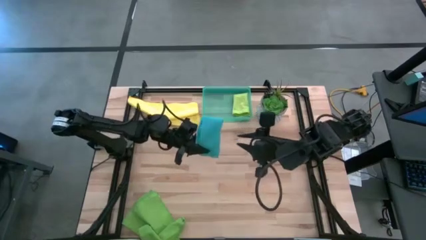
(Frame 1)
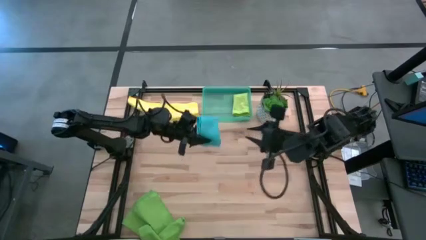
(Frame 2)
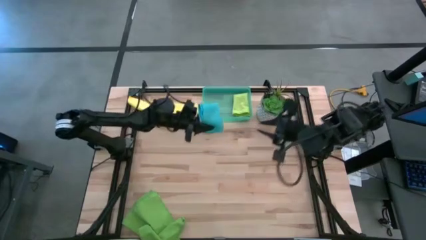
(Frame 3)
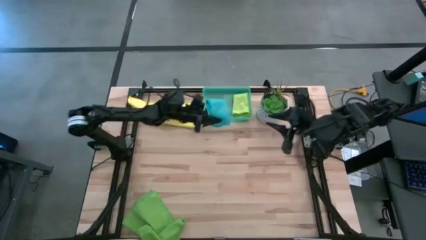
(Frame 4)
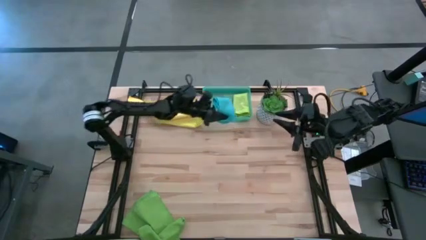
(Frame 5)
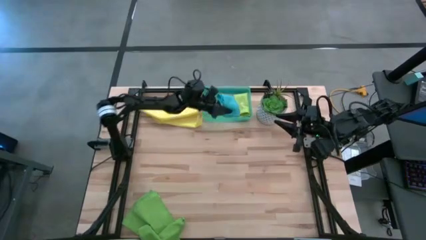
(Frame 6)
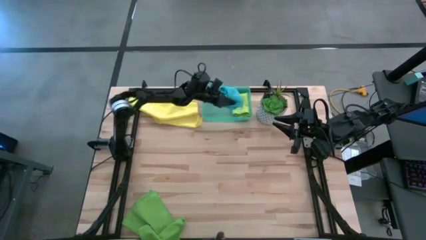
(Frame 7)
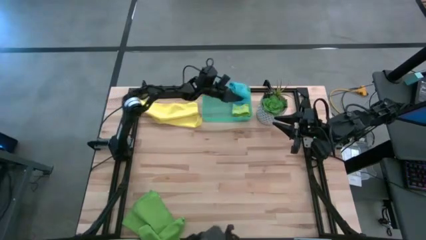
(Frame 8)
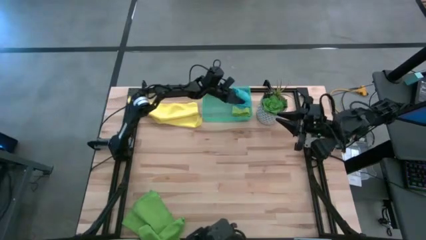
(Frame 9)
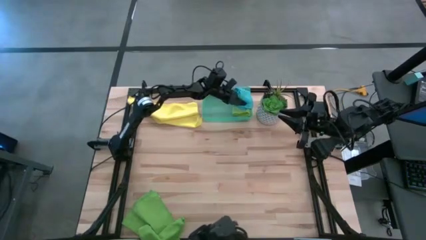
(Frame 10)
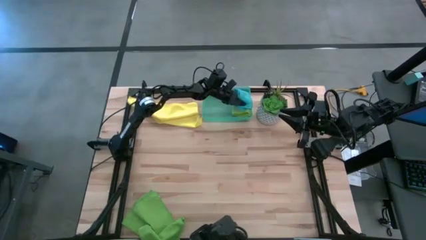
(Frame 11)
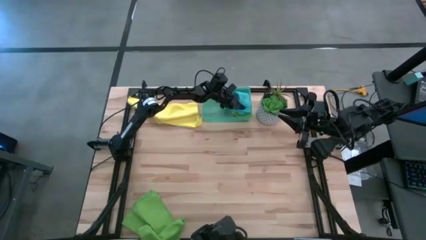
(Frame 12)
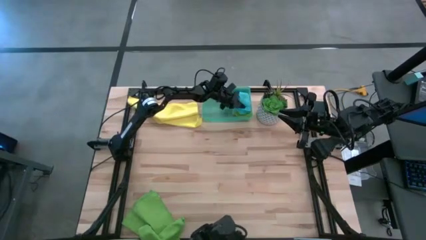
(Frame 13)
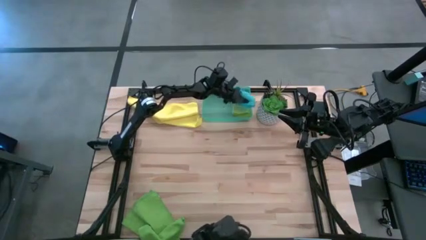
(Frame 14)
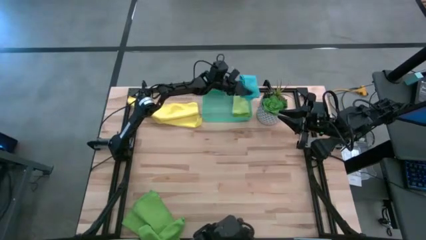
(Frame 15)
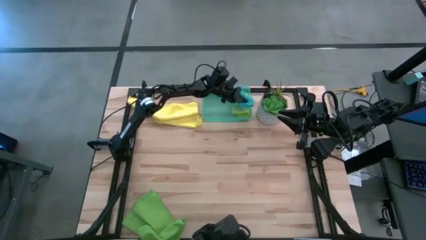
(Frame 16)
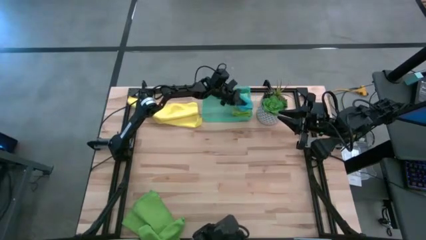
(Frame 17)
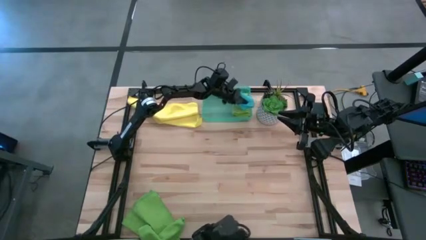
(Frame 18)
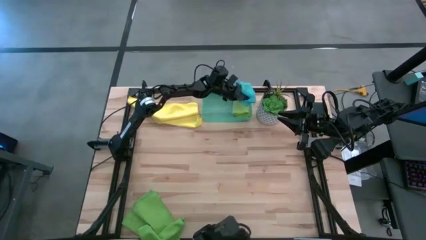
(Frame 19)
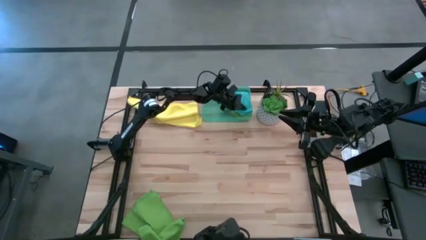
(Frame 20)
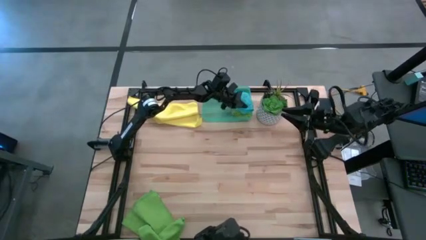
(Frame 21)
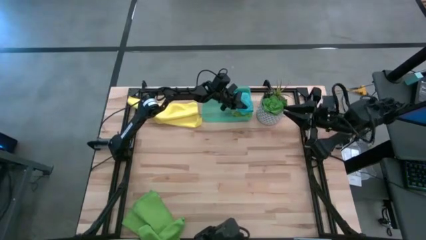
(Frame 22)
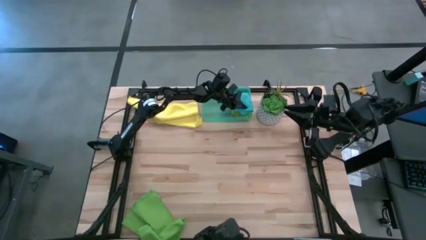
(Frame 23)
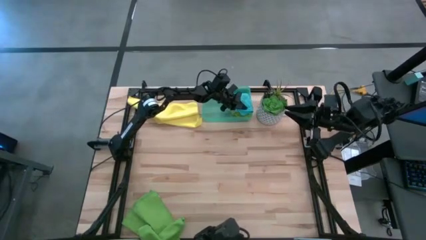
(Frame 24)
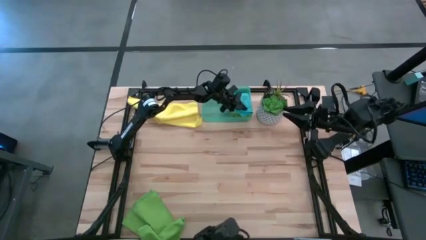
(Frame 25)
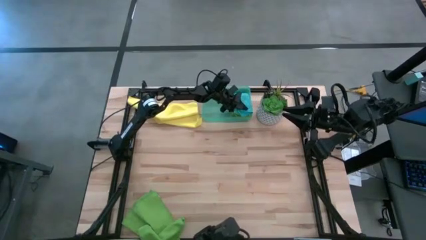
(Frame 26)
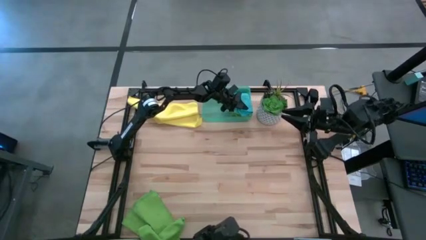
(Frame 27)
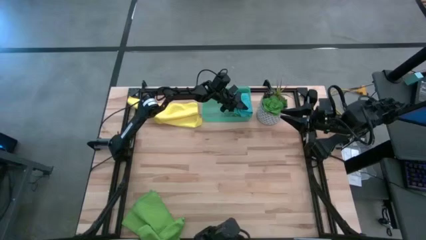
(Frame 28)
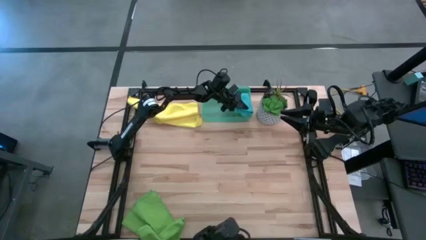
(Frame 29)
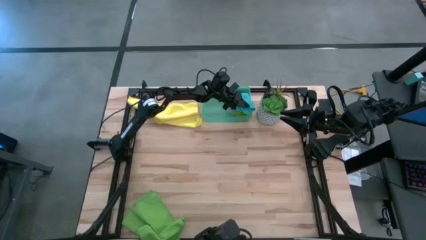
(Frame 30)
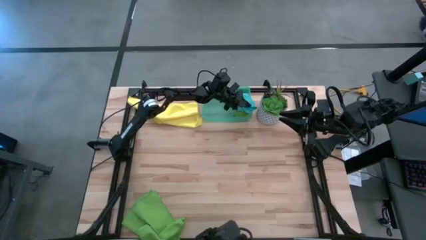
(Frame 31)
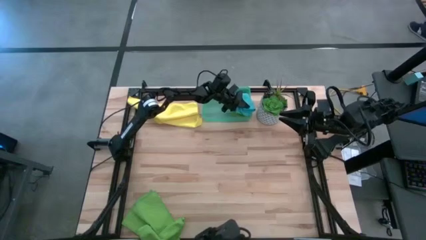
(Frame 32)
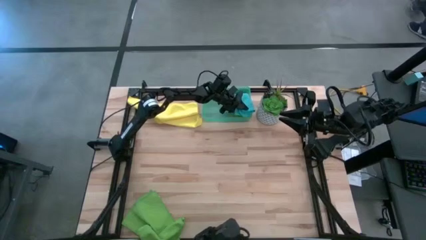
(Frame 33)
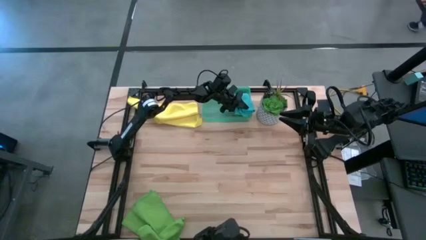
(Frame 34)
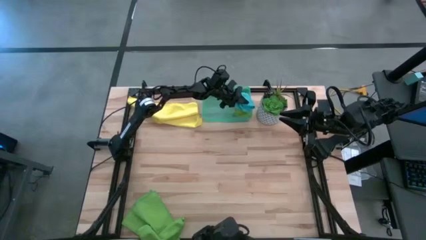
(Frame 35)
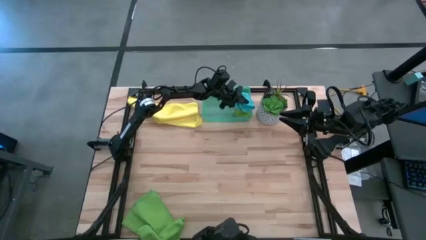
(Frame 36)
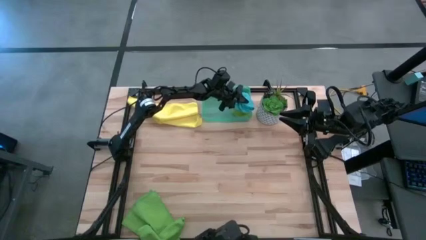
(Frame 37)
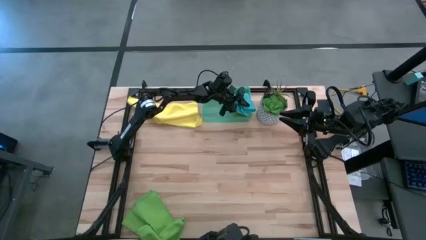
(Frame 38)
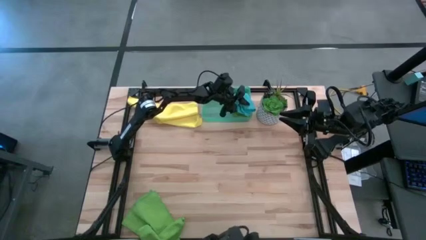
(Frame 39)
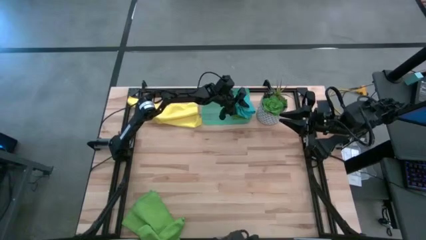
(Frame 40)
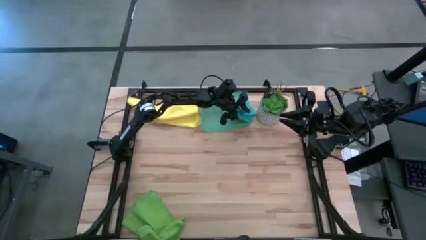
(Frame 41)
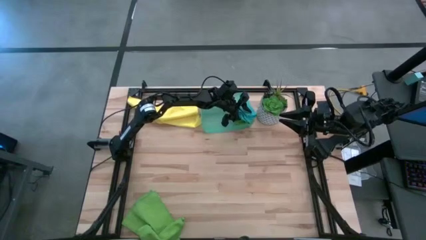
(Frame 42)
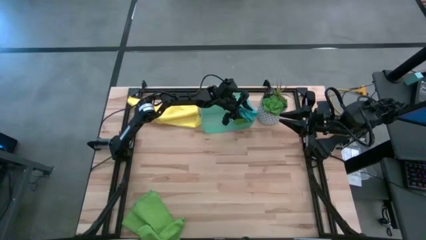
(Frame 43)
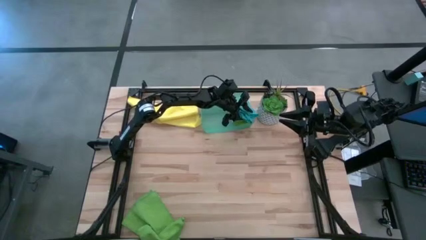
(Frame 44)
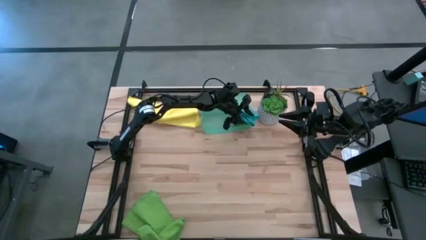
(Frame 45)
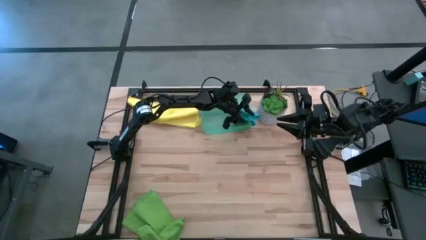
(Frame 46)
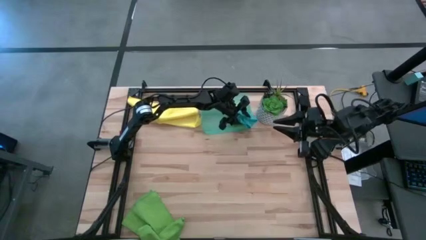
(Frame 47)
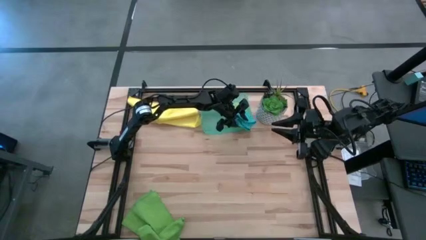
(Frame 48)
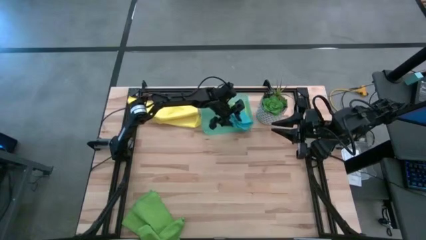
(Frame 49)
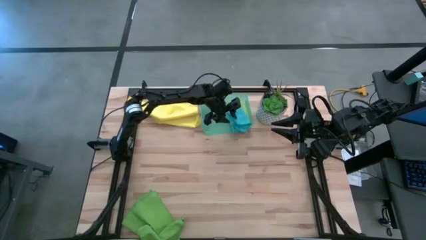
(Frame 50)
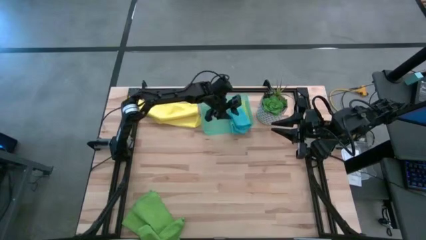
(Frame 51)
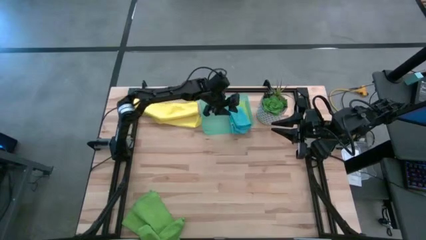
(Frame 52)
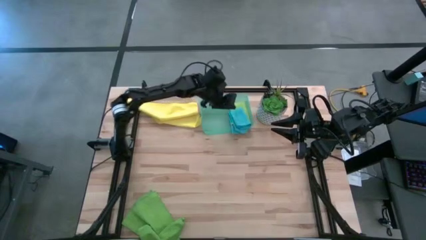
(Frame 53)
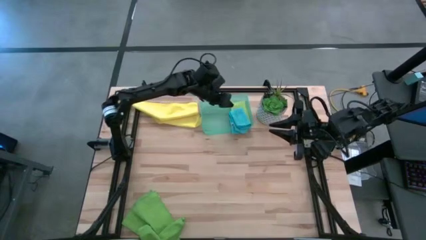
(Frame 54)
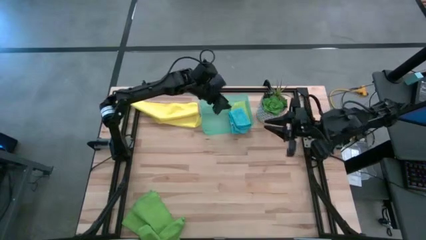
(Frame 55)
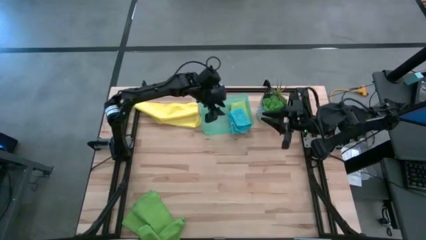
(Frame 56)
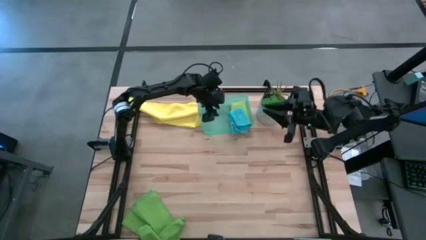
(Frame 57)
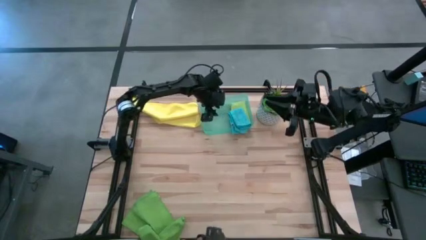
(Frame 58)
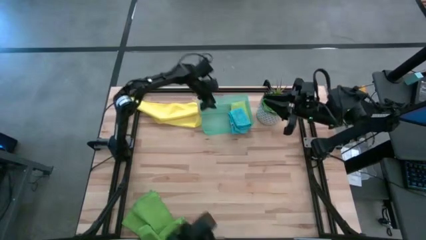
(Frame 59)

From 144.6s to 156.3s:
Task: Fold microfiber towels
Put the blue microfiber cloth into the blue bin

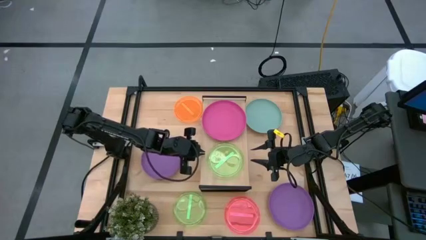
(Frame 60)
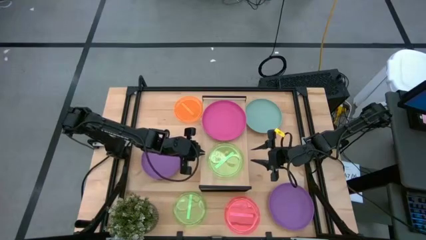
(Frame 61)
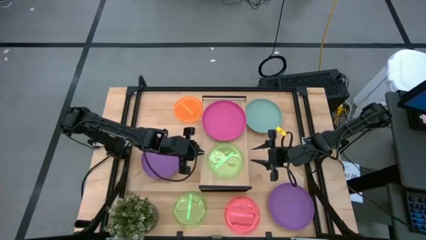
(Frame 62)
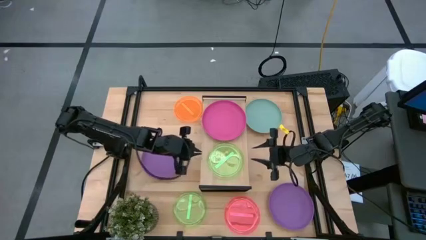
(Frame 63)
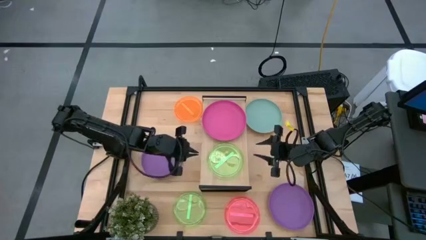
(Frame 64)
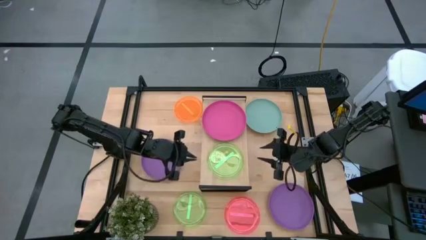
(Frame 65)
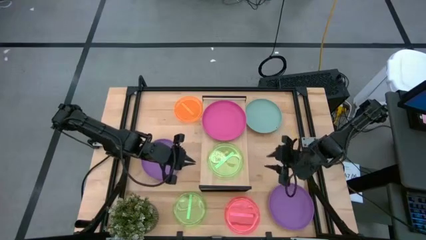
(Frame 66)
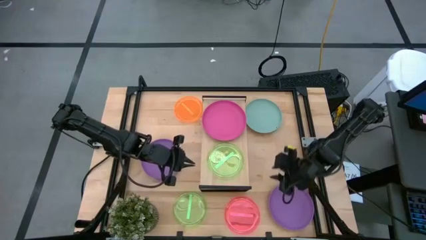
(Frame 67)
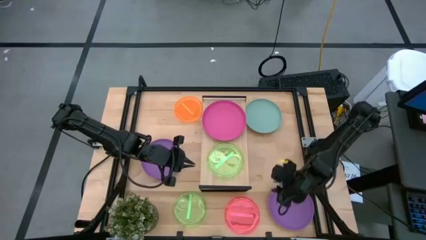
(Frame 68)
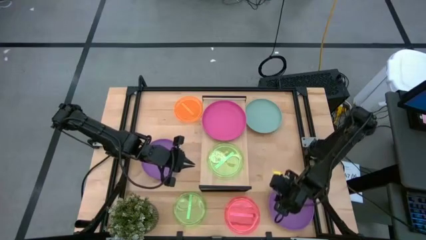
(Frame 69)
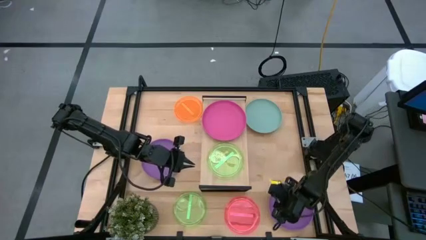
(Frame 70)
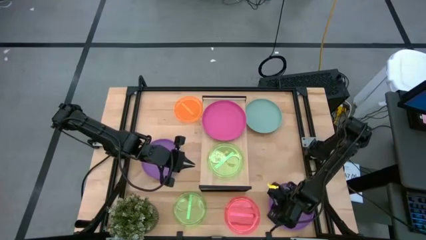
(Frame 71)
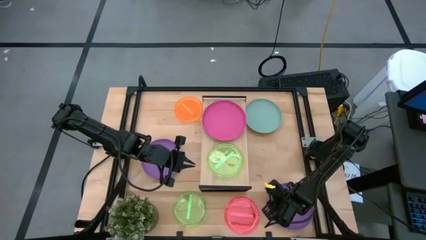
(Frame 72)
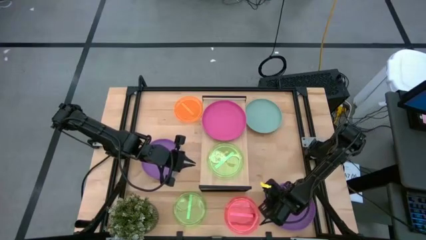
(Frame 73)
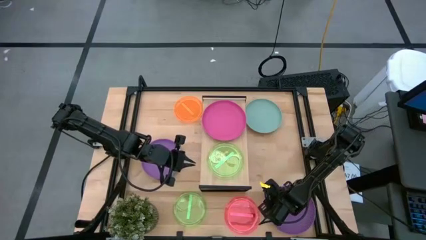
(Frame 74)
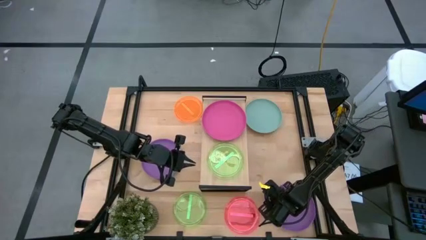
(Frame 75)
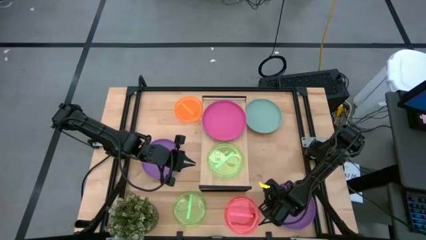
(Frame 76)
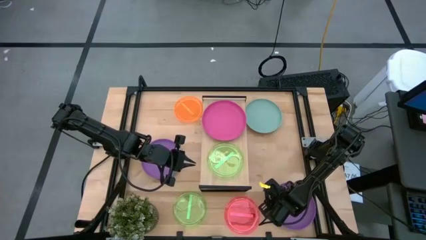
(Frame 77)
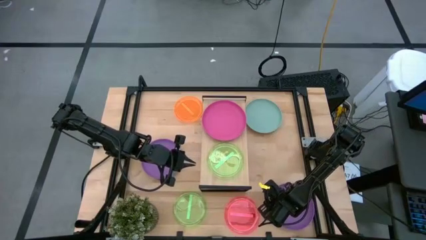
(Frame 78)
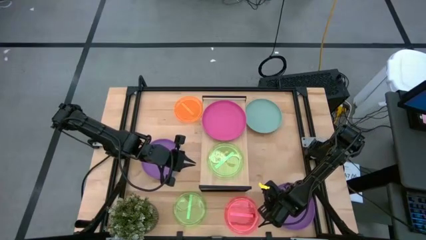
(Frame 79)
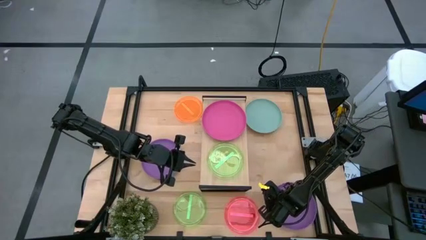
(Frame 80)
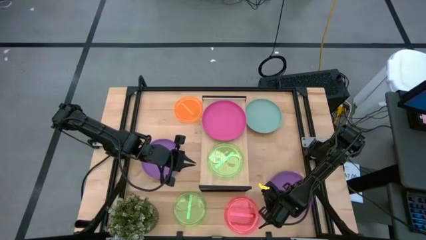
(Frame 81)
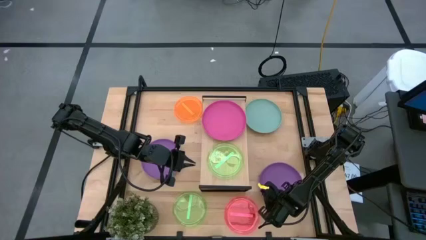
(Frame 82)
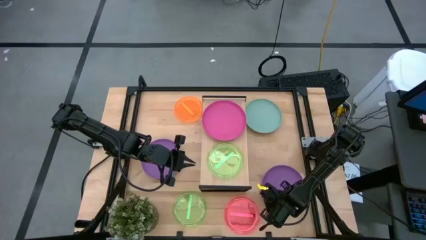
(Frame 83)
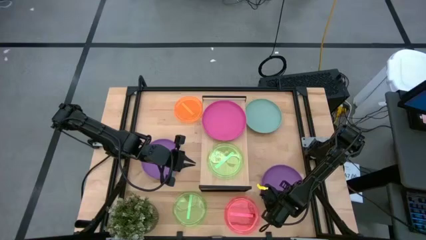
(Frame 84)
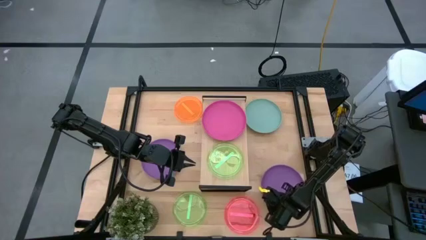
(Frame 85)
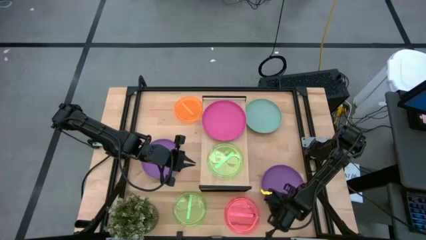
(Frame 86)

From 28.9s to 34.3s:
Task: Place and stack plates onto a shelf
Stack the violet plate on top of the pink plate on the shelf
